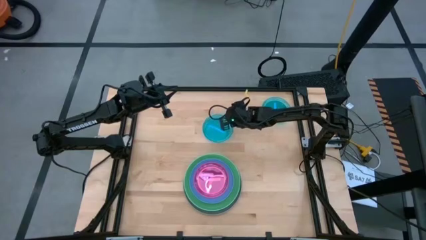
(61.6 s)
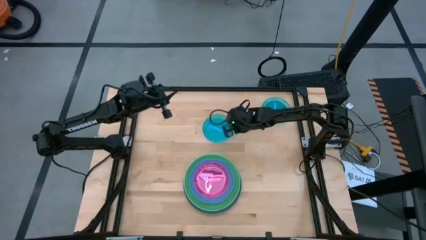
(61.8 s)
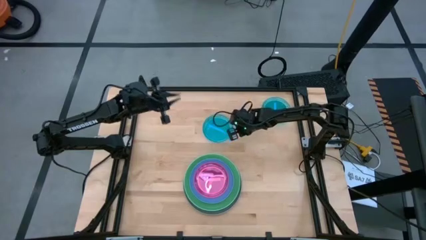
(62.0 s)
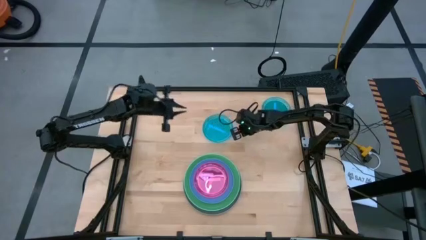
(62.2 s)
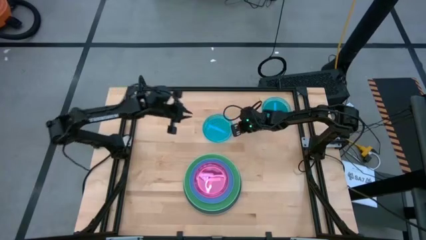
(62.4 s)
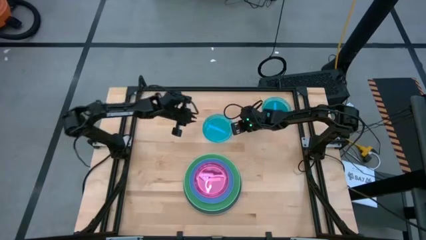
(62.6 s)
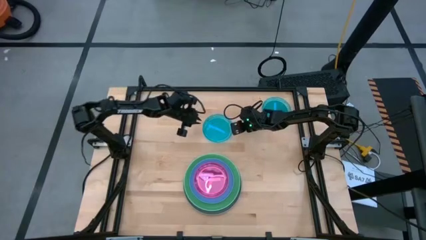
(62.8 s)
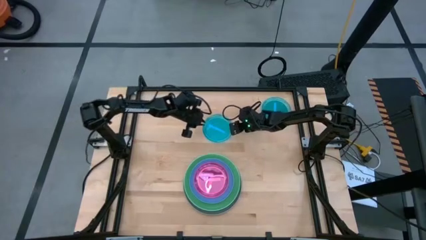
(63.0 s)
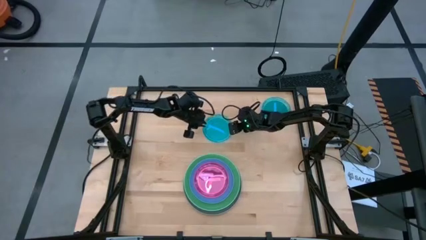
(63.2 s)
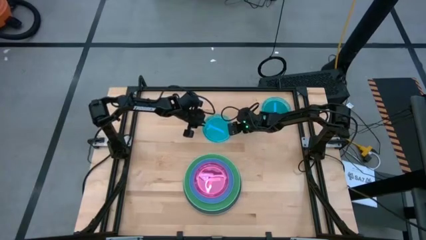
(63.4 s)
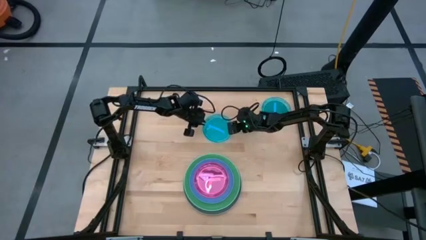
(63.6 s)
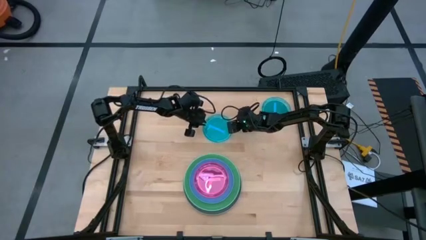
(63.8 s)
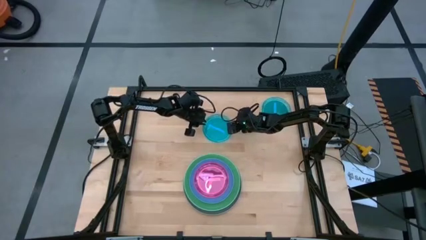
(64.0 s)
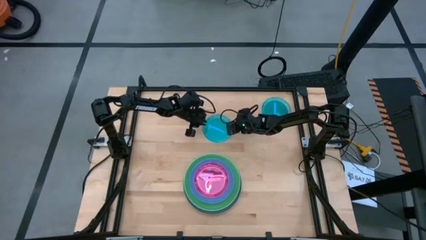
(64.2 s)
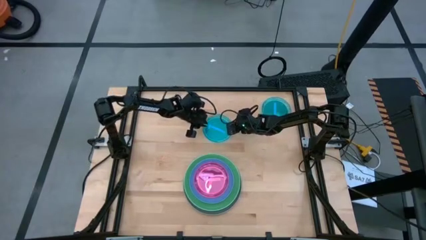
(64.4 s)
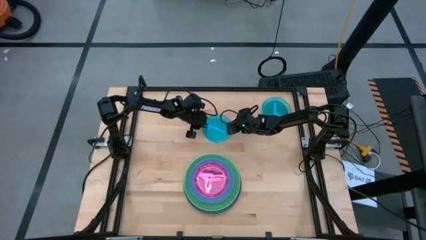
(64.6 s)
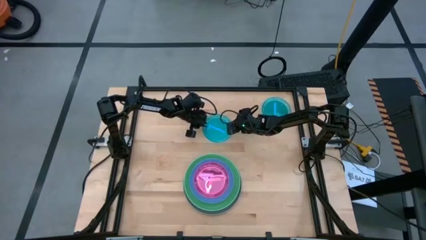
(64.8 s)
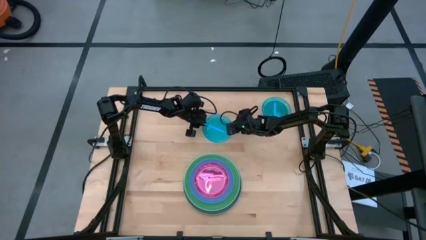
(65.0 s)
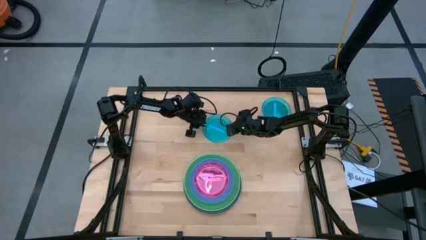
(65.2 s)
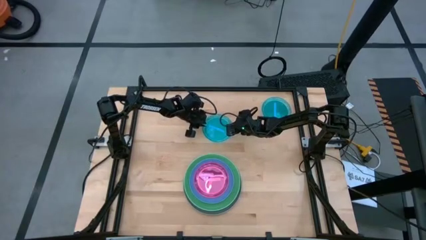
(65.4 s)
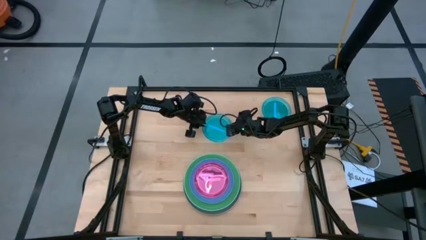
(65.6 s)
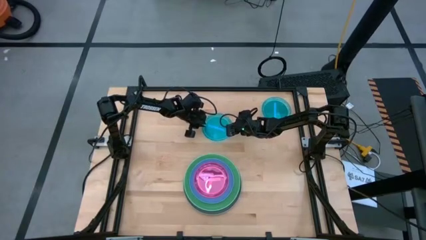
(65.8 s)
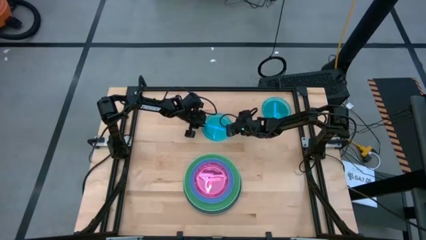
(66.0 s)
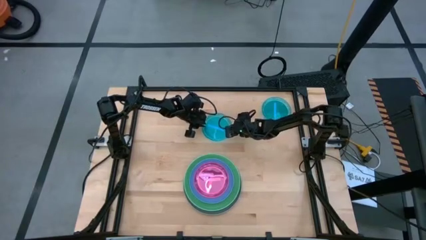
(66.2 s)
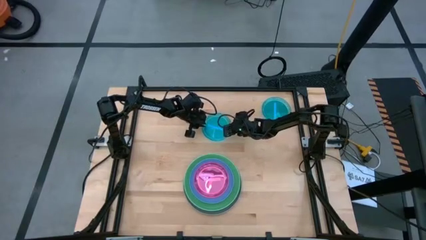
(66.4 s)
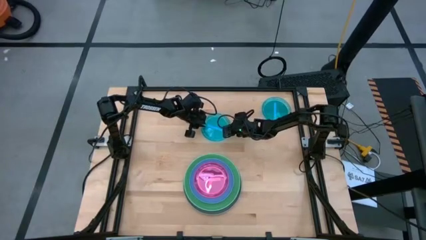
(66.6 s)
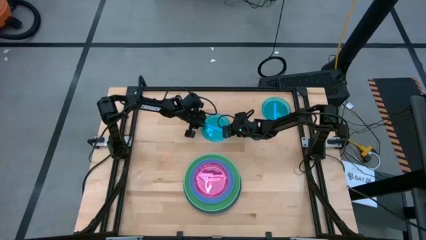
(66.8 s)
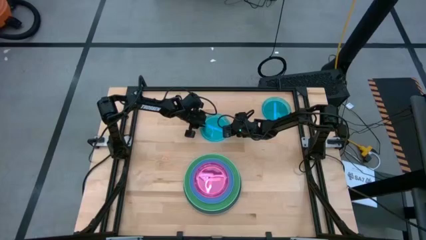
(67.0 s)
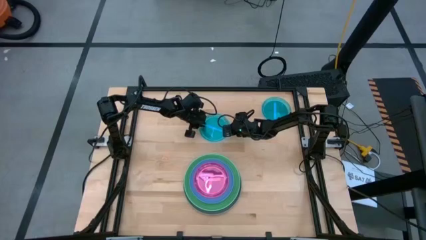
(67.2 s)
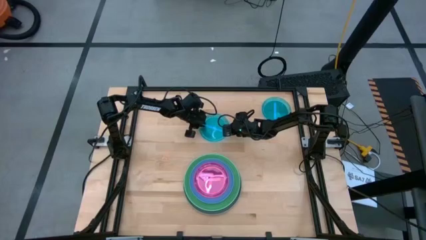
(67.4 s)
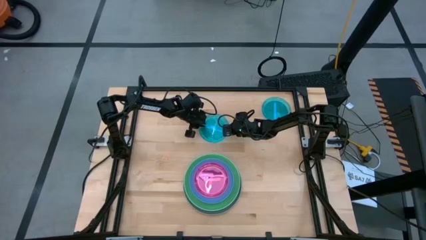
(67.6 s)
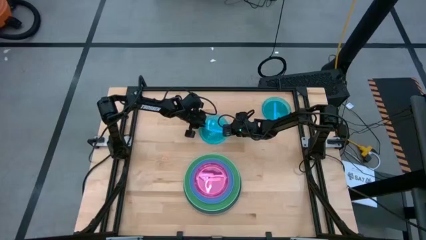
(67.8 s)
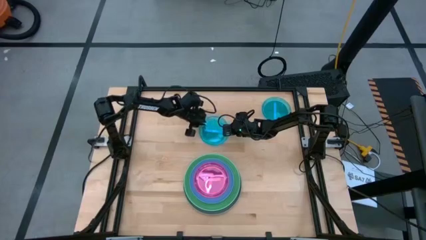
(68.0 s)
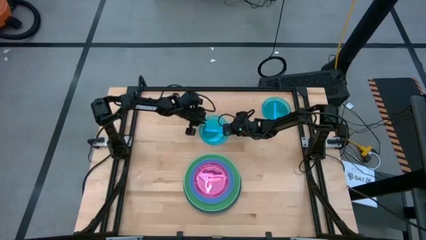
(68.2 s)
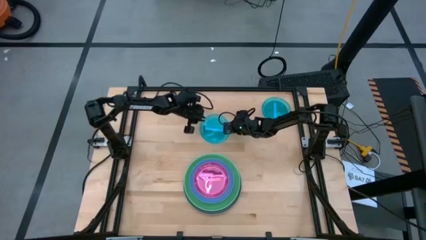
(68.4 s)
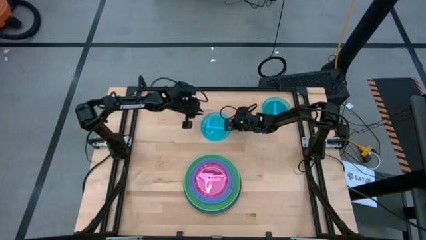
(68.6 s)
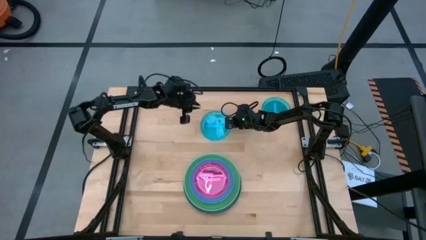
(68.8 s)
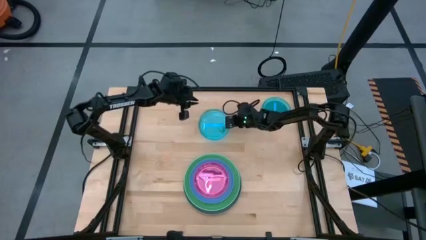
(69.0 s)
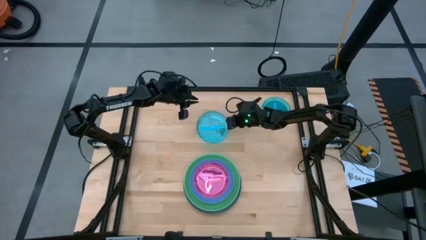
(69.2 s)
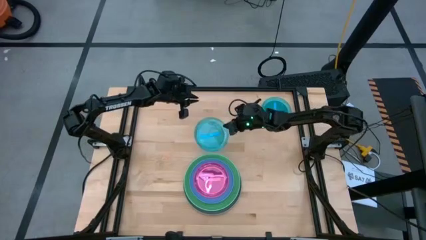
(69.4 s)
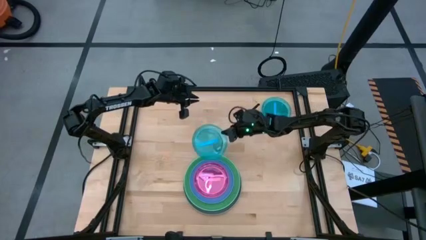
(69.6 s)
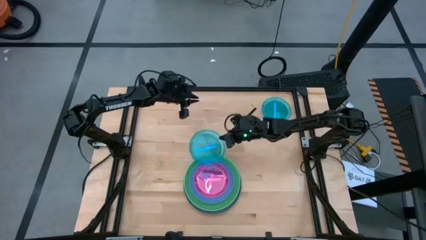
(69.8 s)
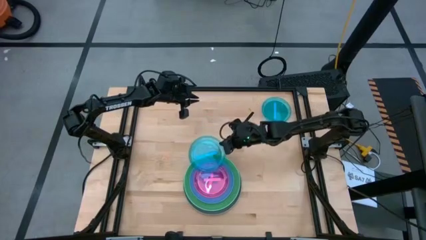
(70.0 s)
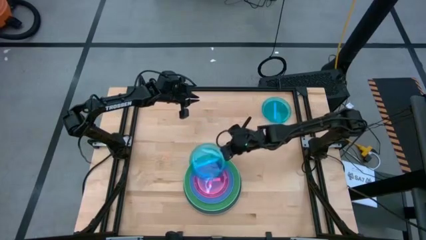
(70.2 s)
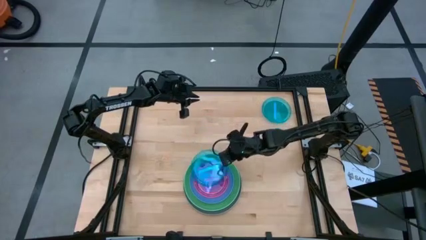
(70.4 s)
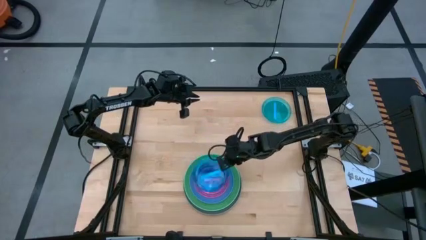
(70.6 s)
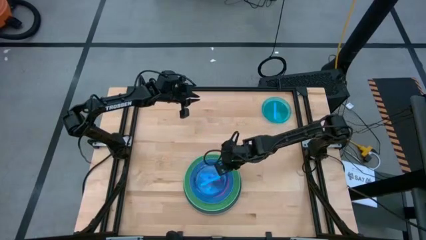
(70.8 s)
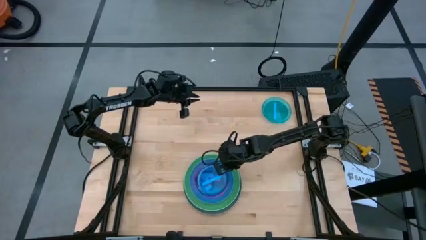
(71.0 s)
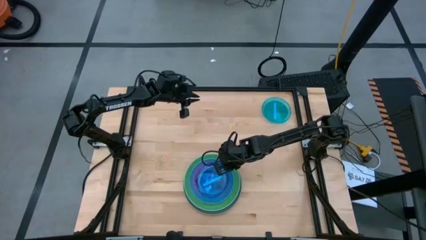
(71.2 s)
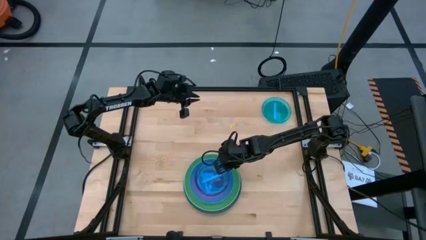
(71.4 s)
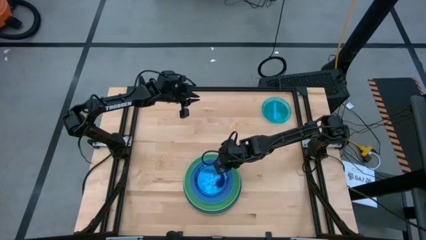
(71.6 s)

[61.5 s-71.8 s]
Task: Stack plastic plates
Stack the bottom small blue plate on top of the small pink plate

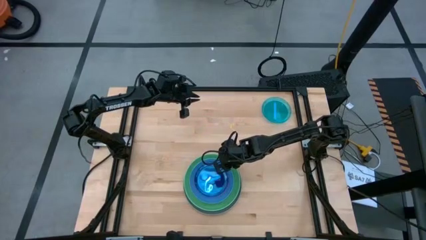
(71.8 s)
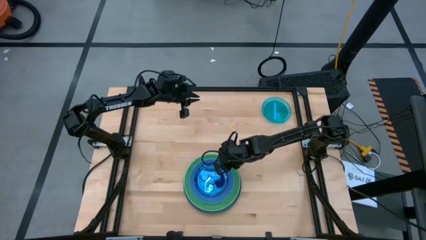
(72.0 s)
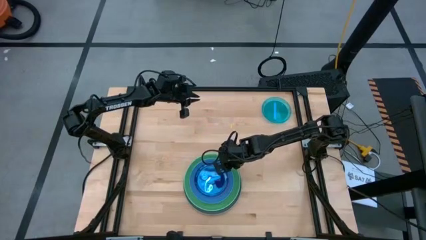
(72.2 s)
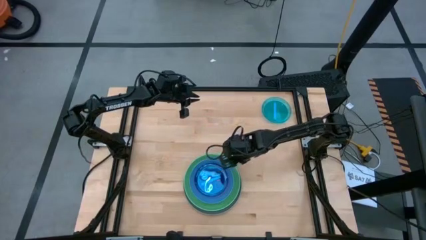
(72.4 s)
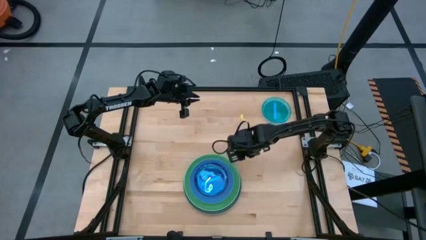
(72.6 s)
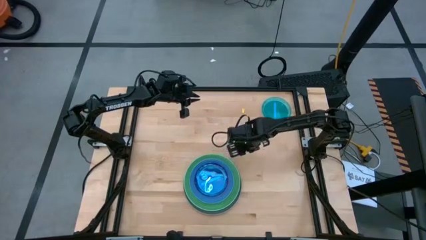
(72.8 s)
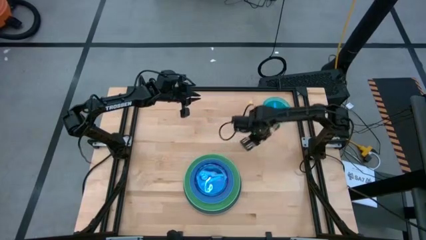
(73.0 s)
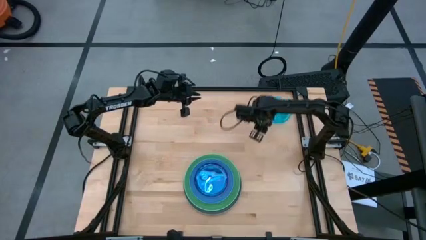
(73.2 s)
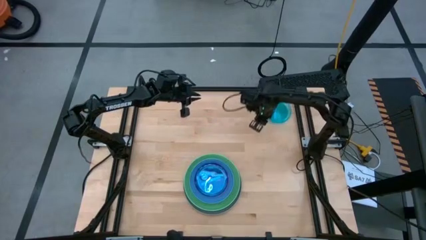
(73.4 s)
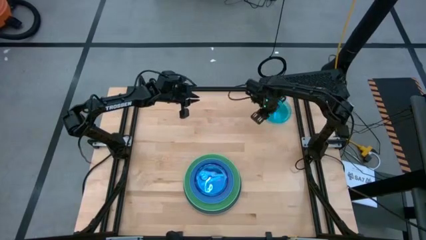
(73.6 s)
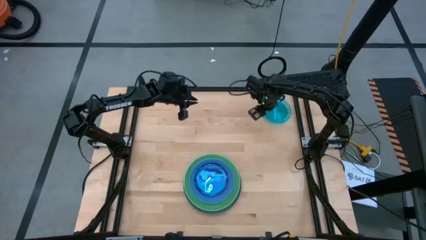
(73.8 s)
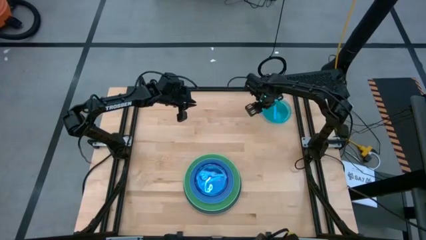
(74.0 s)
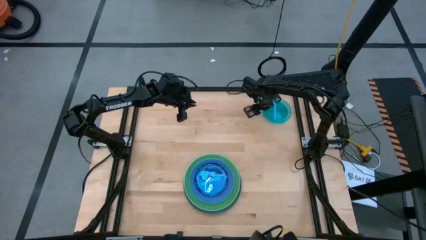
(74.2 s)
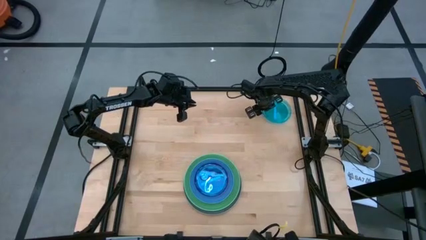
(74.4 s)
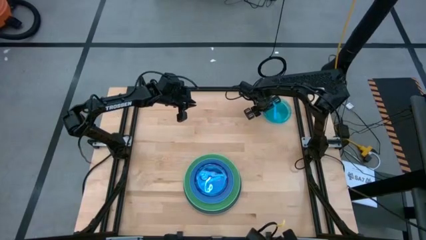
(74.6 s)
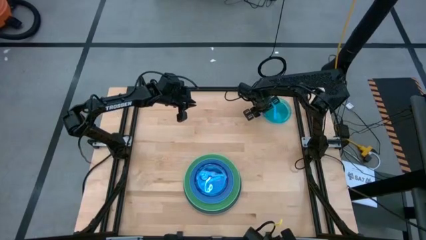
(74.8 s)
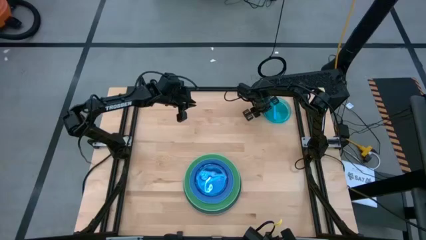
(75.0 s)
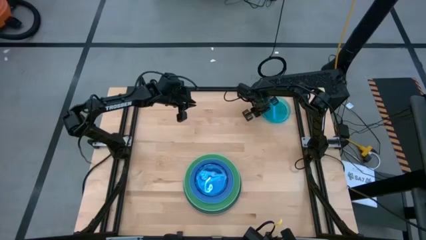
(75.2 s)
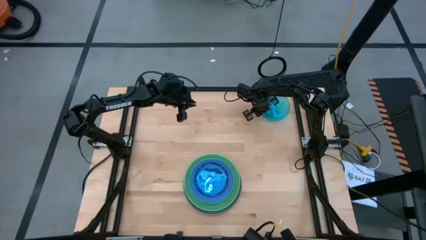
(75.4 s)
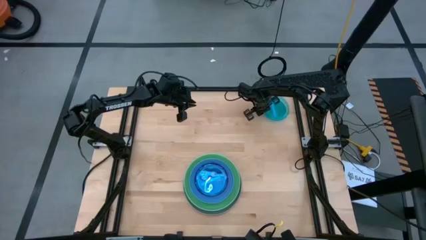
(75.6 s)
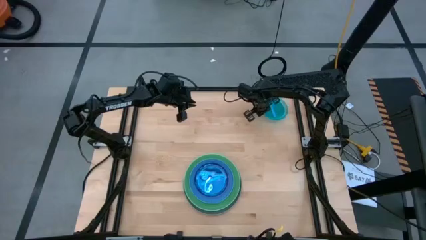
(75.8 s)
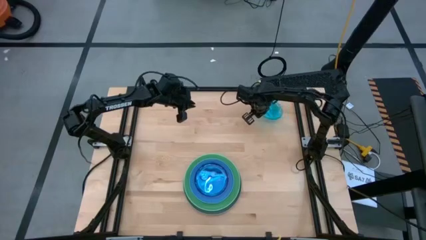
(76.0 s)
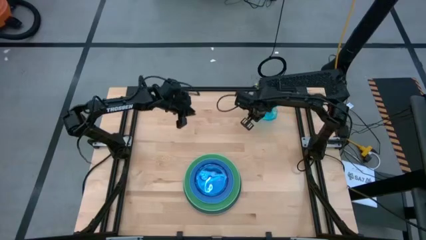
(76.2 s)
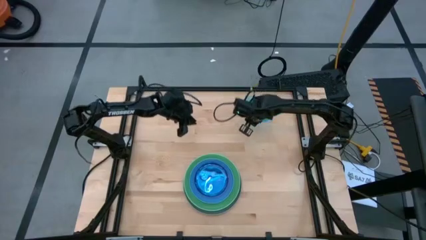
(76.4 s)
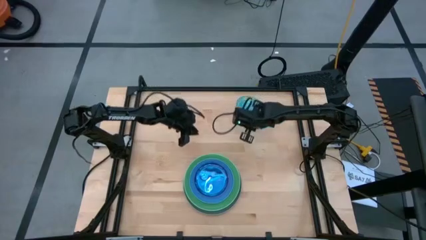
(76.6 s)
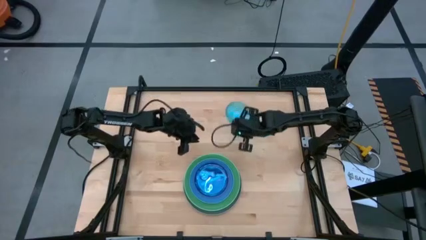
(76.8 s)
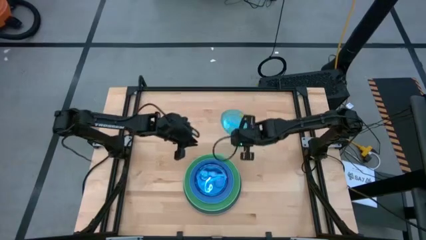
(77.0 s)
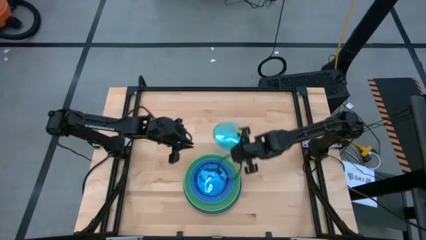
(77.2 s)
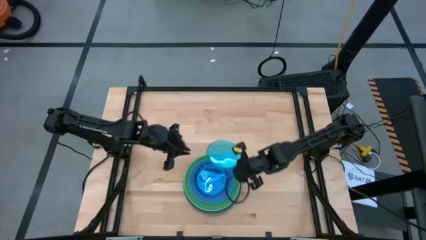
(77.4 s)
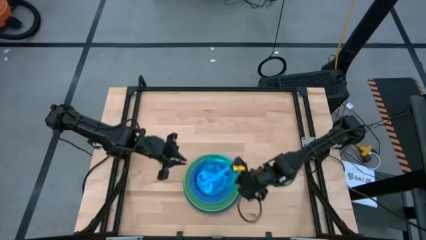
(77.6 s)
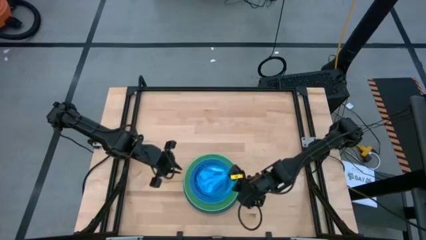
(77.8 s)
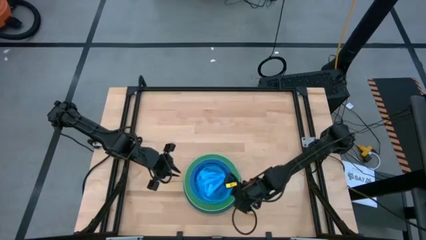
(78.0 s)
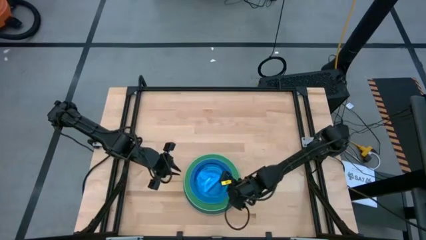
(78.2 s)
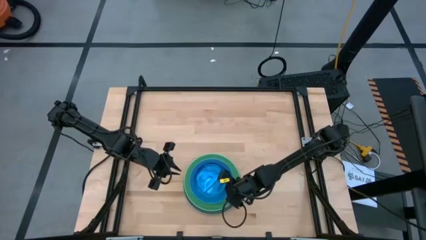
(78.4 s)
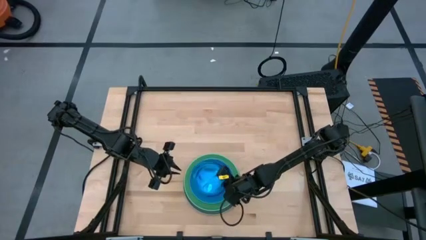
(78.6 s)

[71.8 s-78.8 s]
Stack the small blue plate on top of the bottom small blue plate
